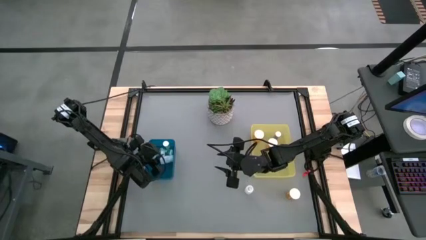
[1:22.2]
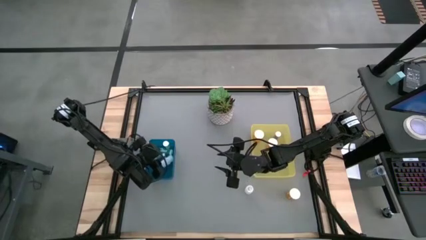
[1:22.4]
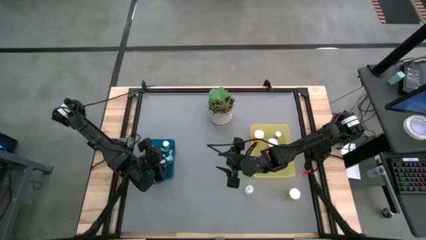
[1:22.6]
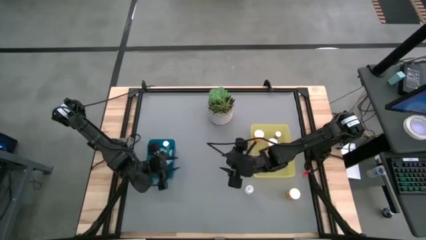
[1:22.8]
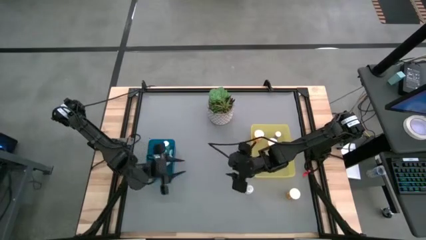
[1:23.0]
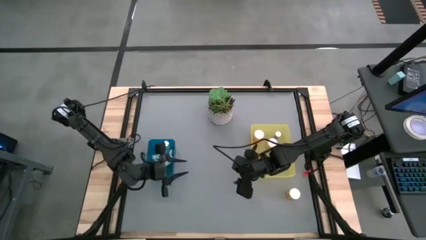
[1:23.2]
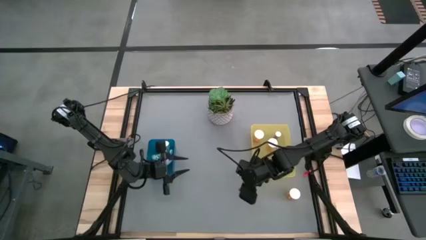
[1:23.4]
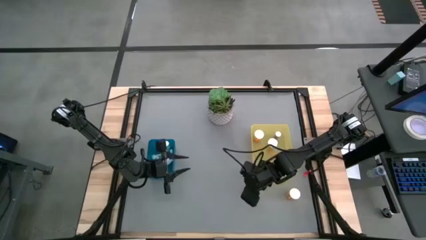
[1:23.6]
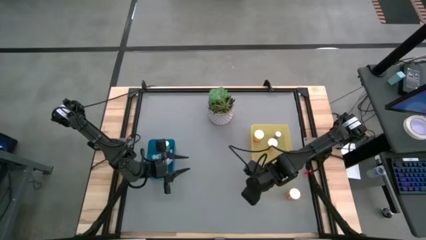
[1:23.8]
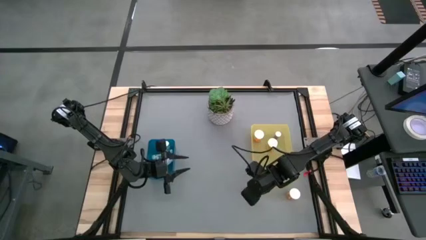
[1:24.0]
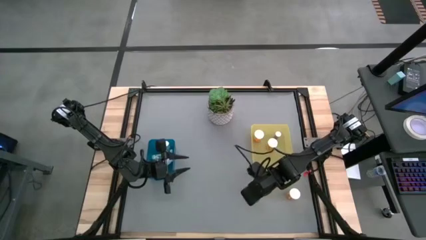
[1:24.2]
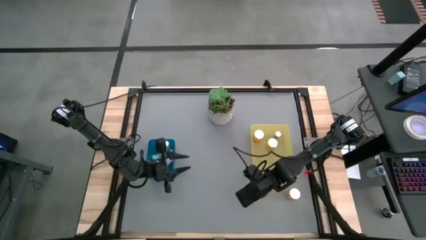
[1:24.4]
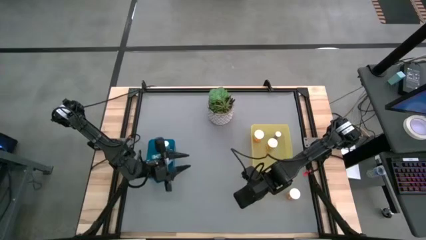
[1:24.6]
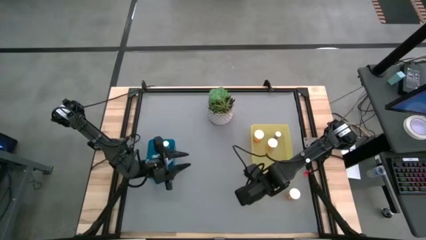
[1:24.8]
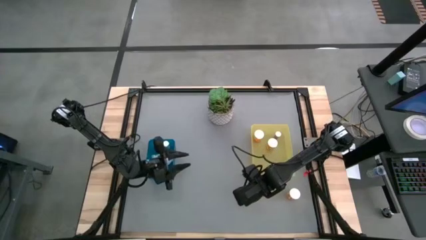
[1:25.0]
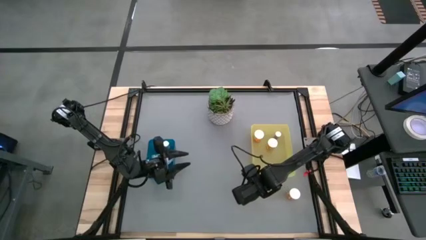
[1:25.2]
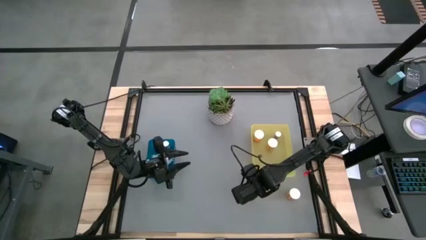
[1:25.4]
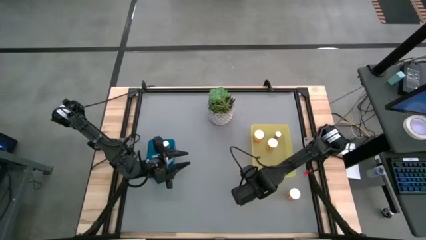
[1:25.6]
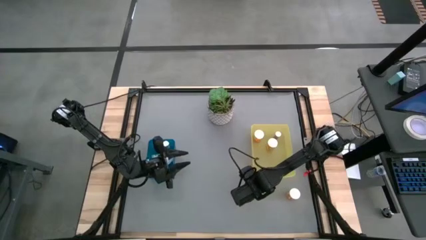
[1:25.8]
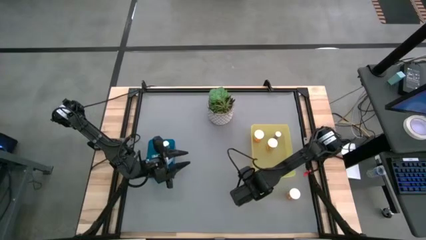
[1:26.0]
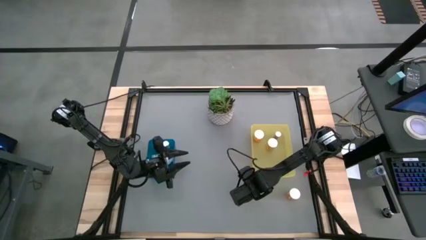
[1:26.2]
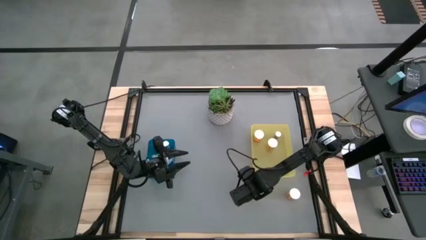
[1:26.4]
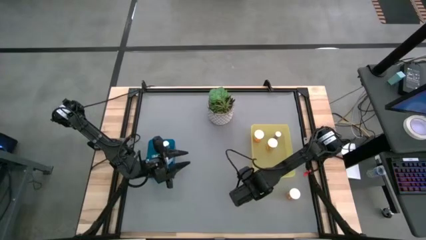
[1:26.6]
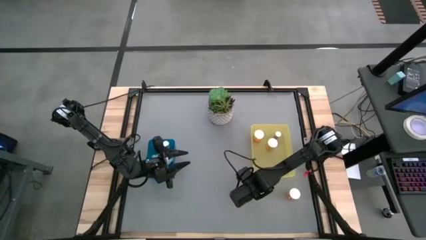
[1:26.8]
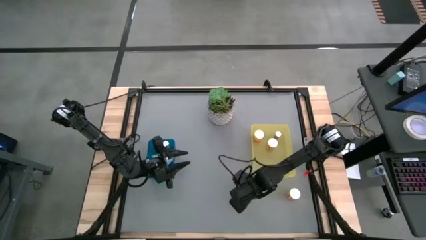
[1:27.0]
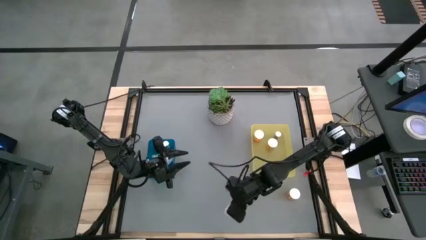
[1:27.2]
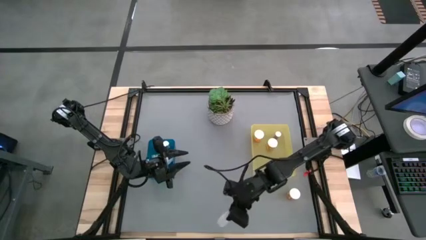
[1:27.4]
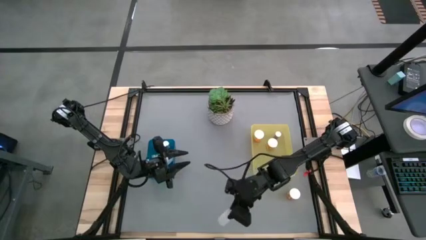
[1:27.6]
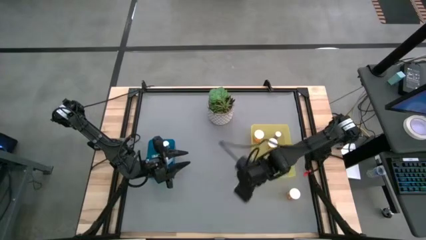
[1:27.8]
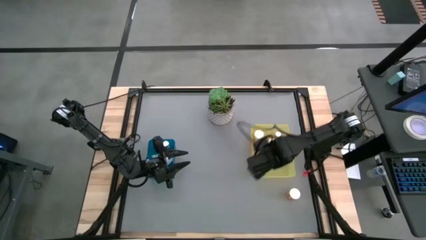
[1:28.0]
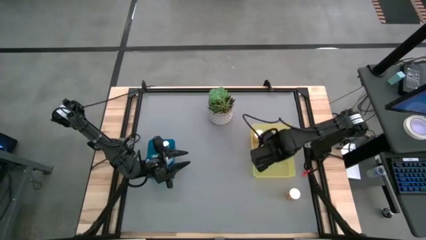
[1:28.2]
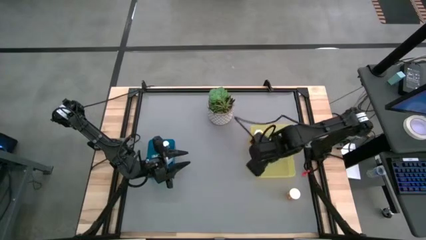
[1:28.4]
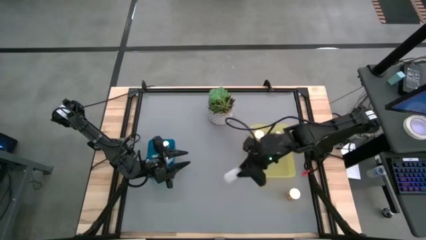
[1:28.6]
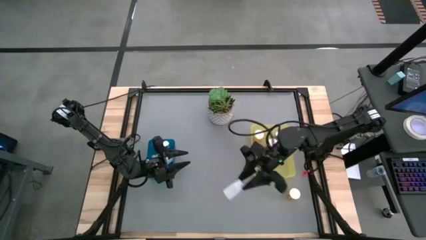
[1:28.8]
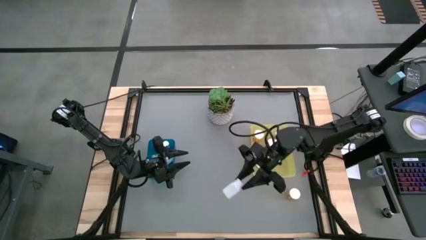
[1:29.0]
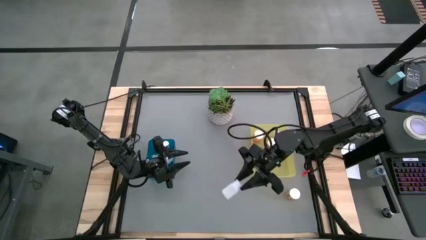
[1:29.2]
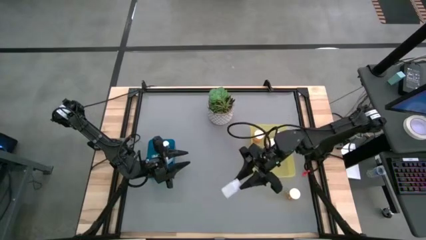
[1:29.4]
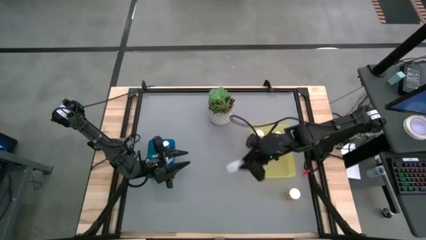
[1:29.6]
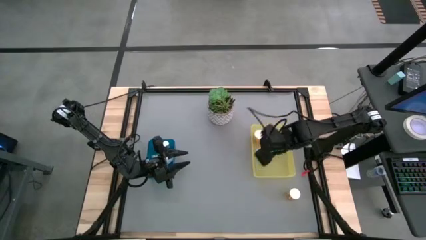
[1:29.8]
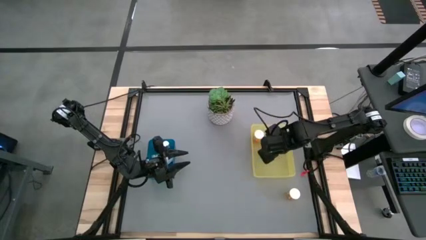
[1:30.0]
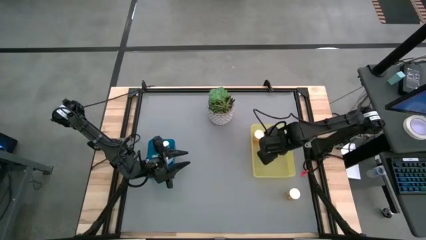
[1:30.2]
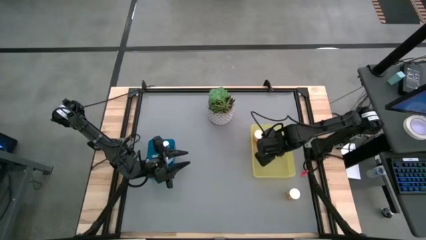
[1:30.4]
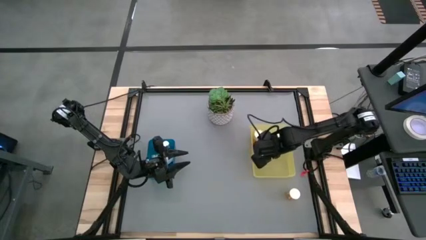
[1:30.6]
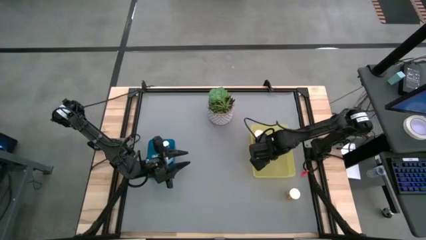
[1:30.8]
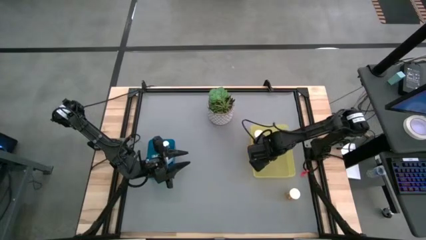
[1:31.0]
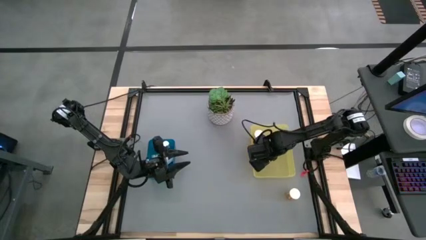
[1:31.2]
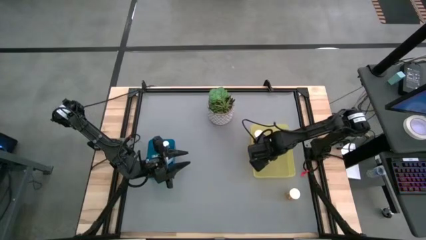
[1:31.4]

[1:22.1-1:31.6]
Task: Pick and place medicine bottles into bin by pill shape (circle, oval)
Put the transparent pill bottle into the right yellow bin

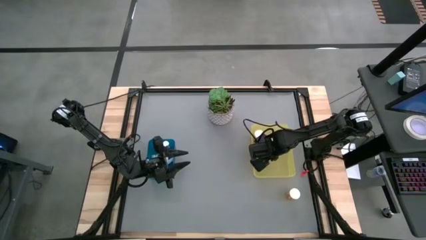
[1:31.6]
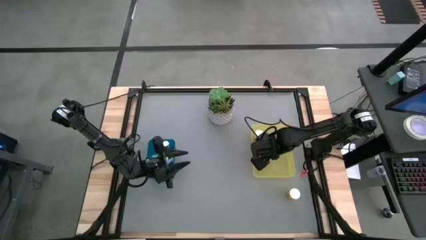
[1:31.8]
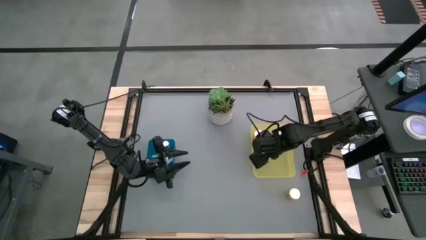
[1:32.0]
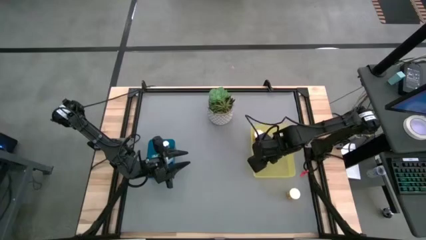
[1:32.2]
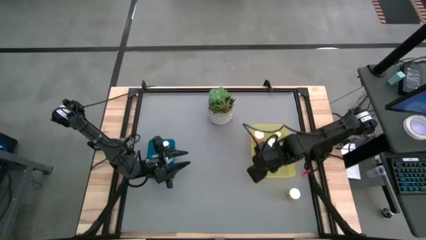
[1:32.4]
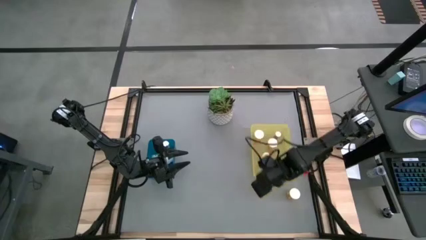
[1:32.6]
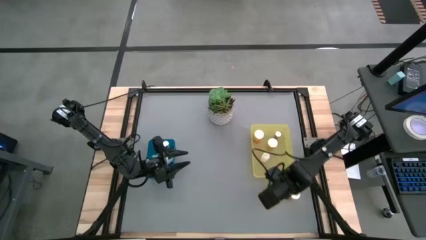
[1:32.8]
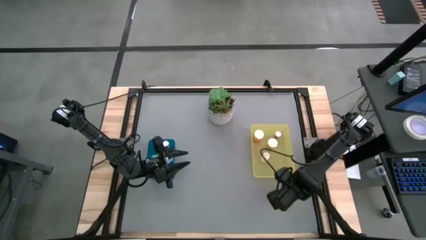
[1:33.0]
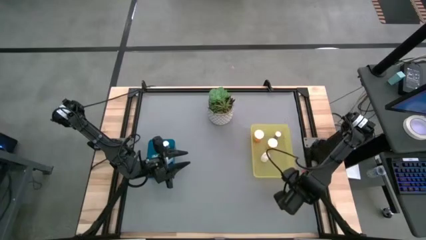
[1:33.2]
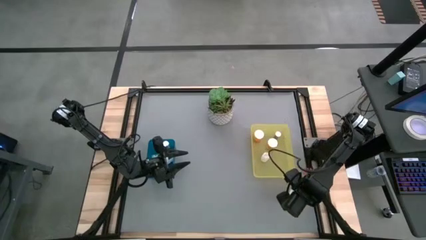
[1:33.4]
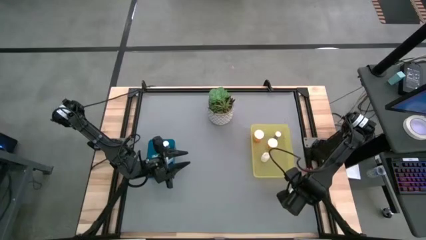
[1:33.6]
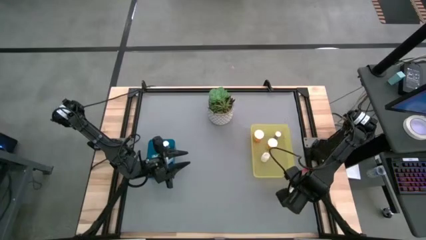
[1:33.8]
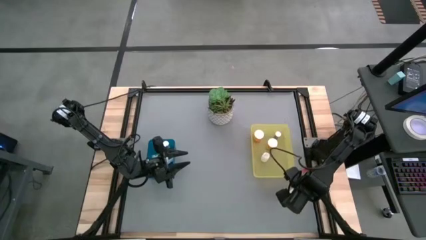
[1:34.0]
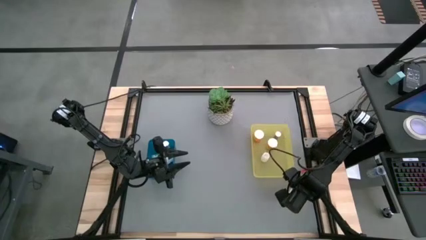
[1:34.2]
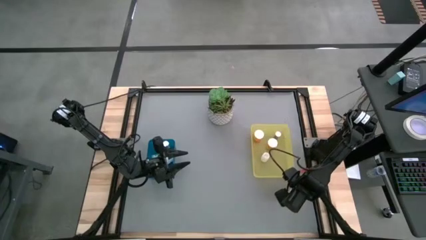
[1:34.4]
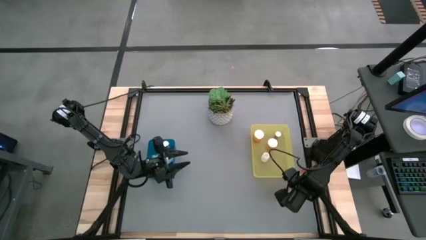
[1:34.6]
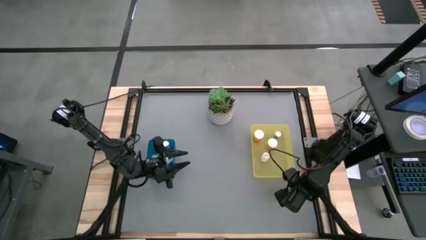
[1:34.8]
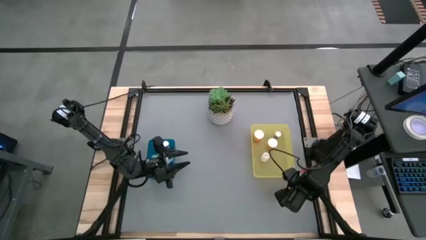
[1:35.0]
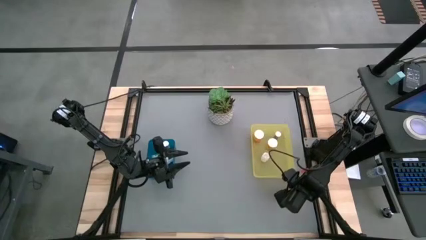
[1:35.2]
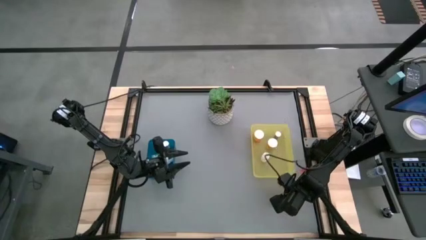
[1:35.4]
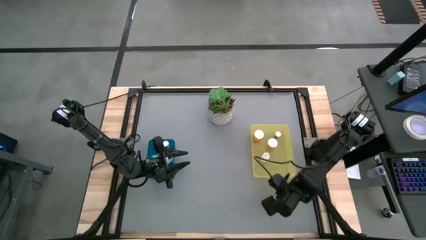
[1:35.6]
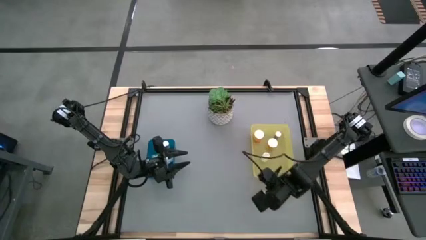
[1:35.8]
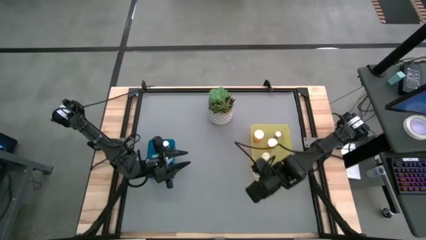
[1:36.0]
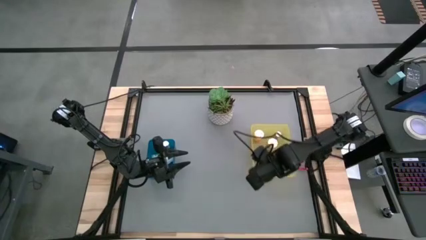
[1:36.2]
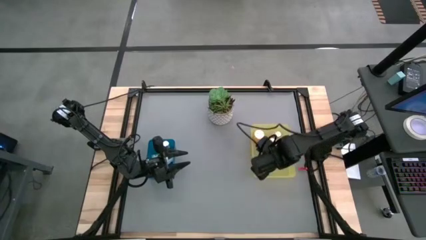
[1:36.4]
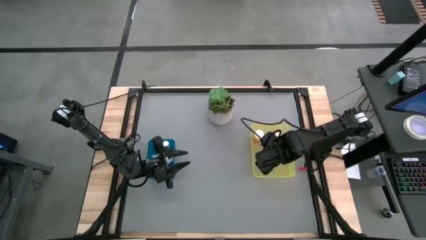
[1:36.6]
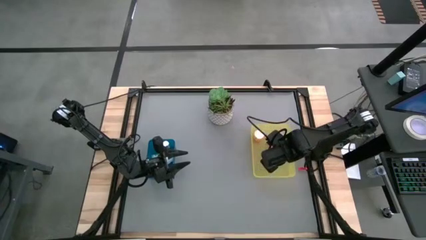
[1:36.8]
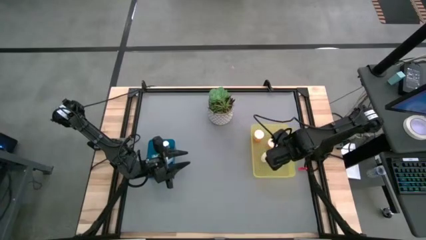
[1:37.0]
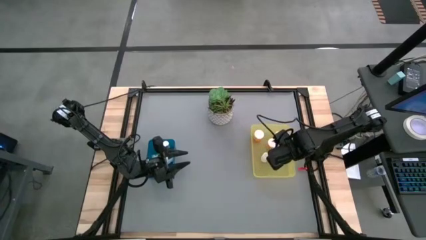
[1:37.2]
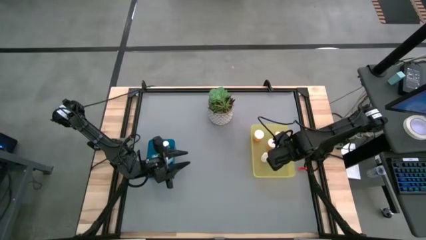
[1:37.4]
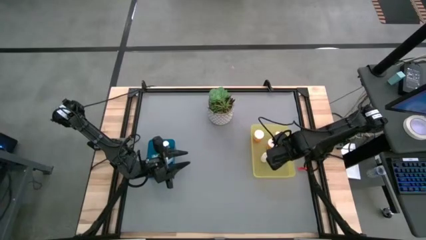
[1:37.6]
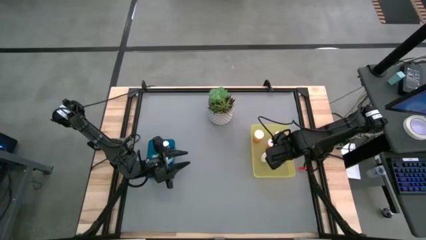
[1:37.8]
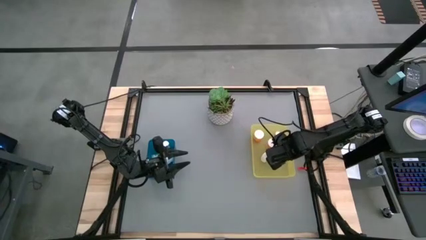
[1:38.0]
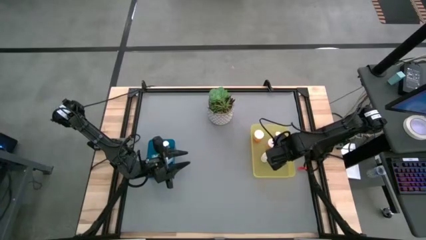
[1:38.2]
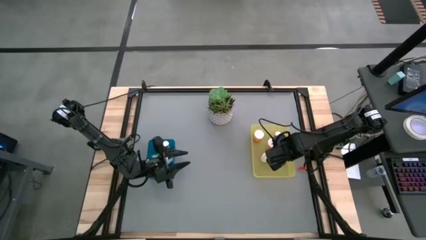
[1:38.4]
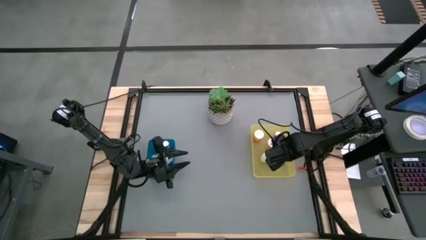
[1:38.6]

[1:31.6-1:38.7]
Put the orange pill bottle into the right yellow bin
